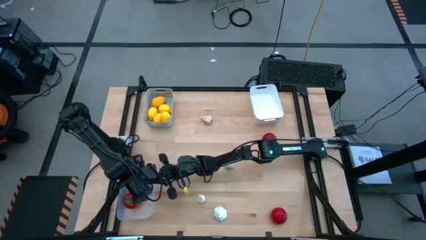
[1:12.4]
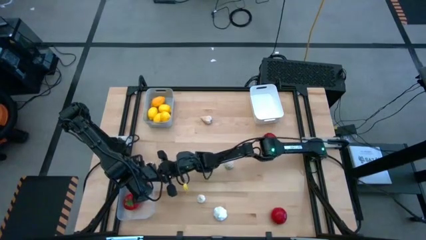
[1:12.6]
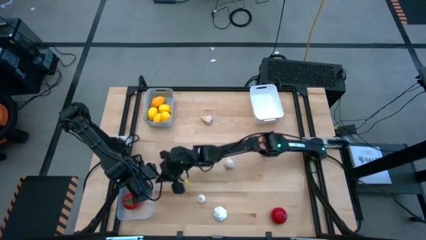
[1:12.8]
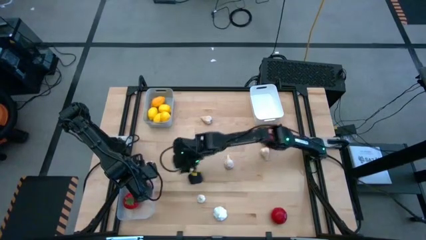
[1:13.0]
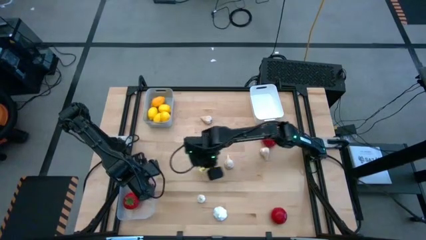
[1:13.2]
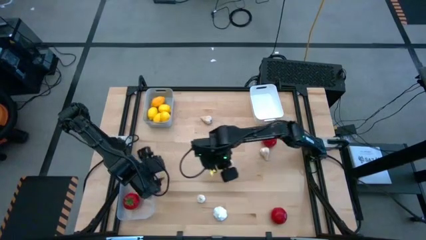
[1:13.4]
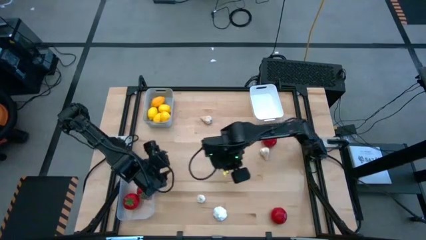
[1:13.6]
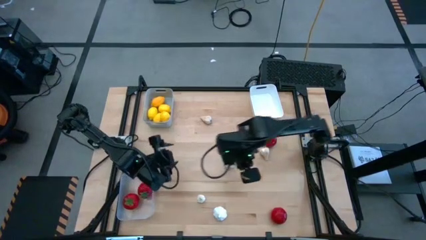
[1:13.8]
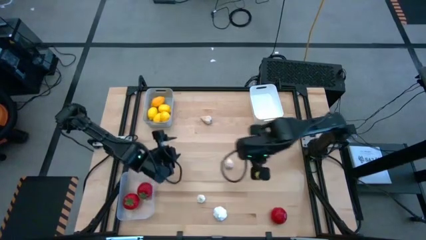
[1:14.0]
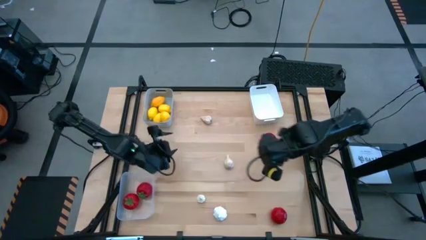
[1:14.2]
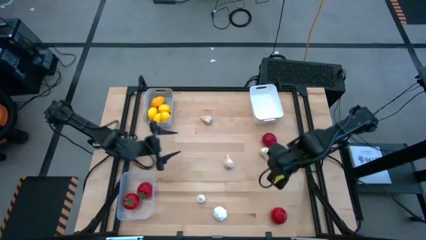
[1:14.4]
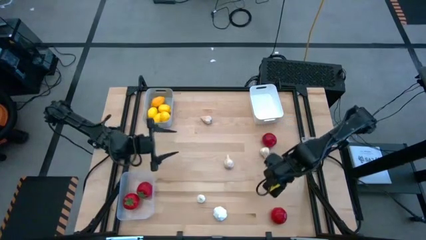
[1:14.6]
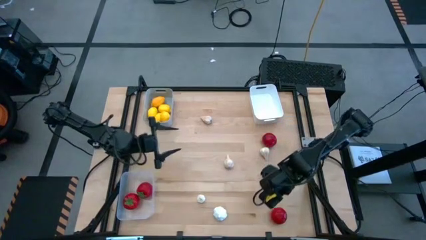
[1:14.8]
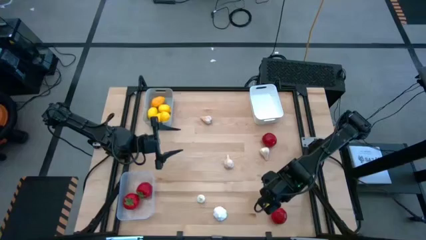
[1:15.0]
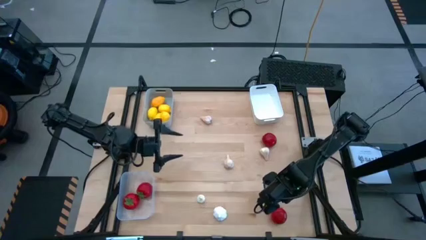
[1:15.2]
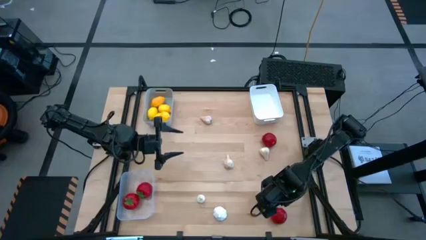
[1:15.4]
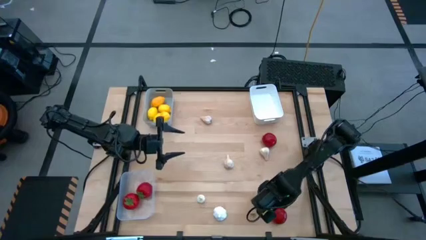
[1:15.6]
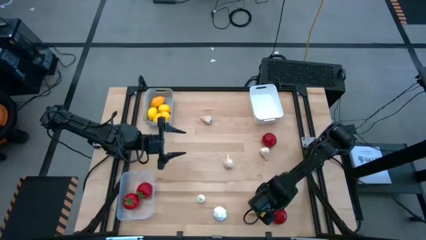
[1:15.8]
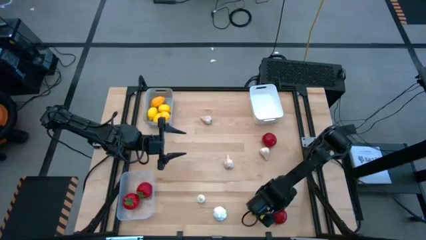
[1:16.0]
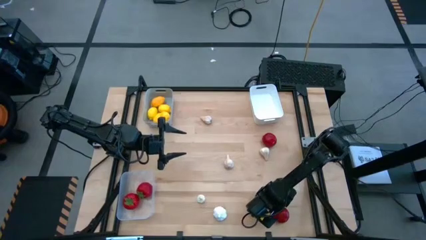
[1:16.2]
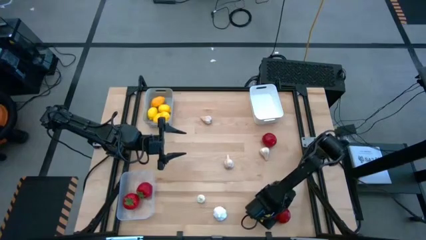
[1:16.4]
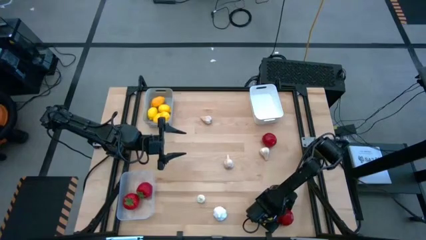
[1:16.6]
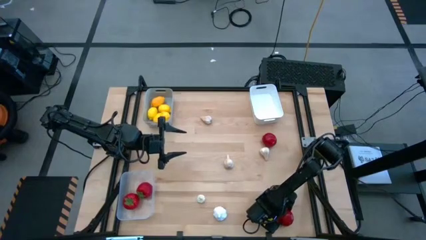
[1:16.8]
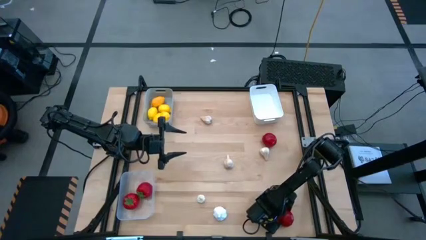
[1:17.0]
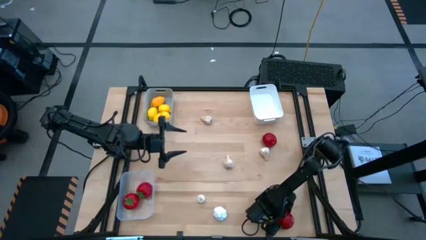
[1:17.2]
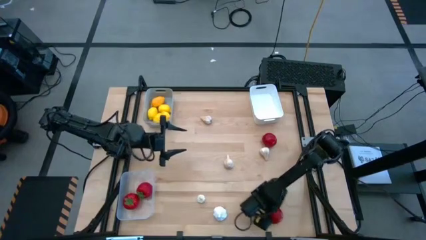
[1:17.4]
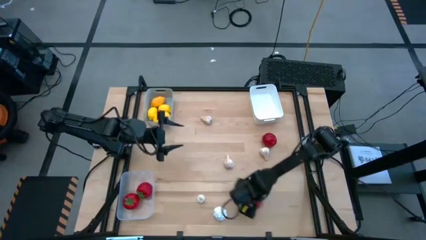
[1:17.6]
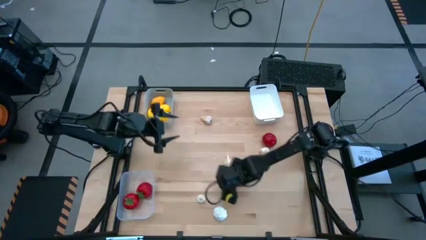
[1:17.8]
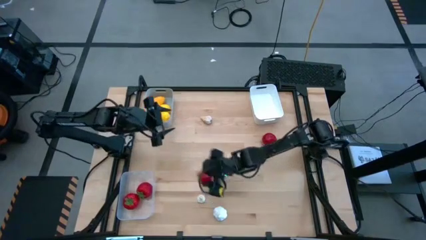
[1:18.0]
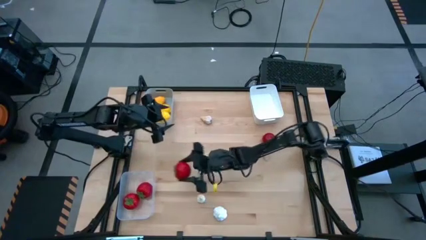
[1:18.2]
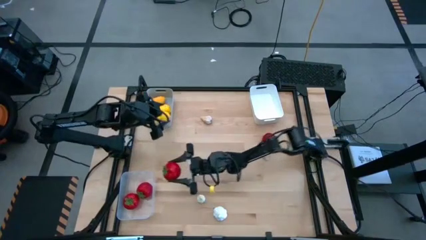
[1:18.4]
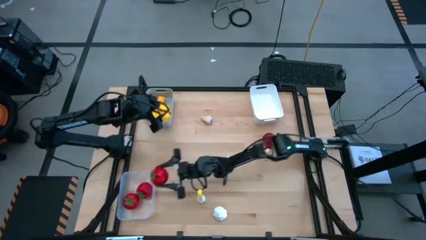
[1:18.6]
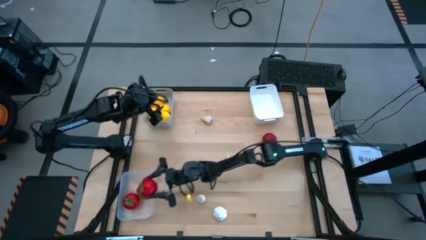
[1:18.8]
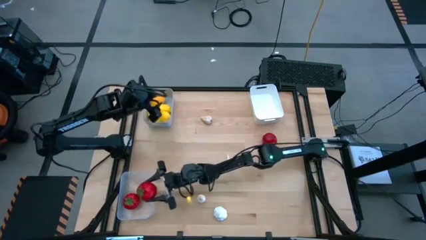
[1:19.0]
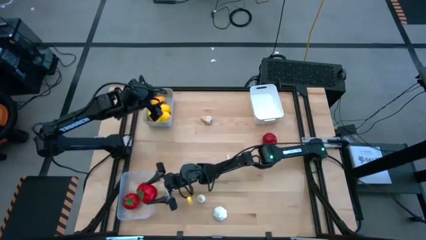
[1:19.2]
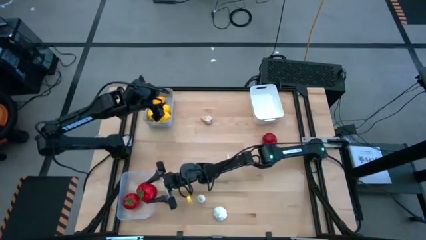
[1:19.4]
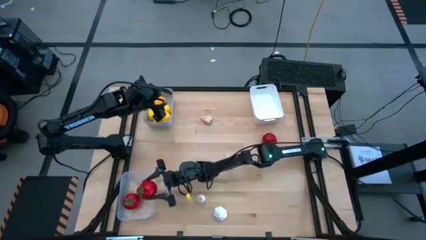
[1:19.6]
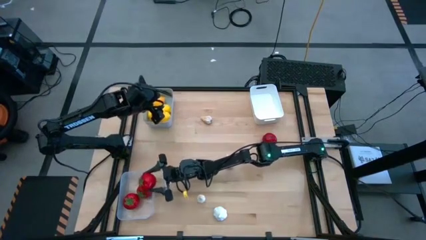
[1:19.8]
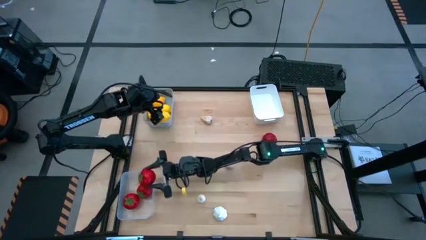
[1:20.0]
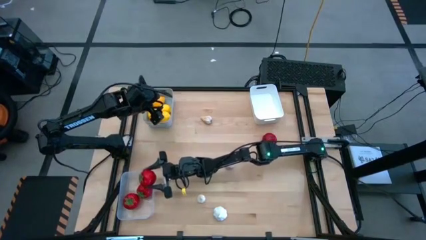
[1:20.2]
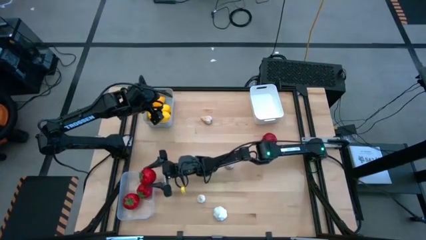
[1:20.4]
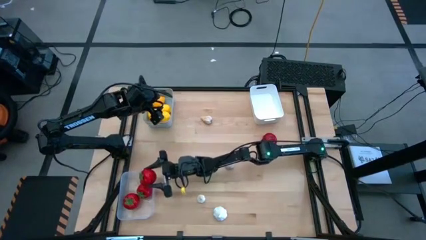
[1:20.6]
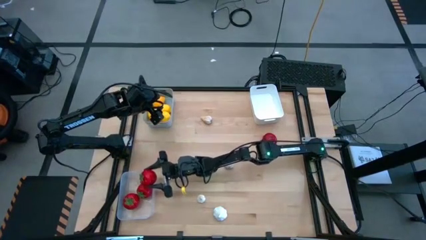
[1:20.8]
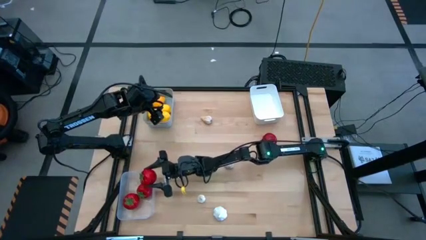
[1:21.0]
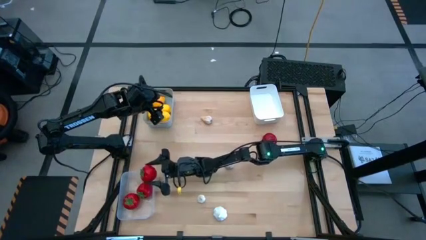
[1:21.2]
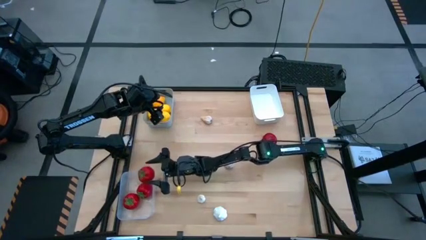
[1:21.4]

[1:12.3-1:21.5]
Task: Sort produce into baskets
Put the red tomato into the transparent bin

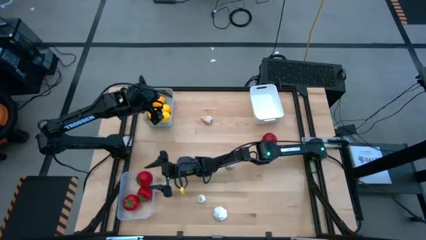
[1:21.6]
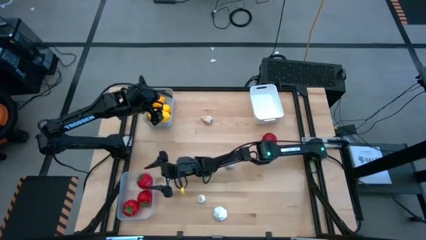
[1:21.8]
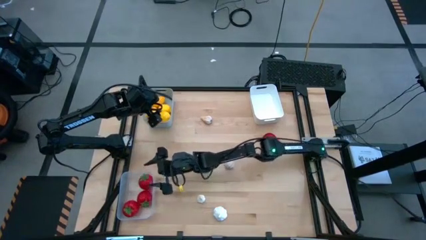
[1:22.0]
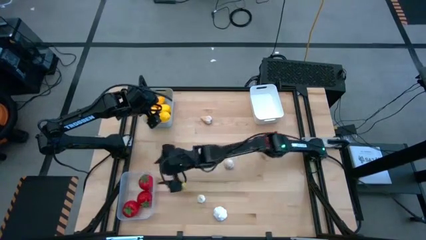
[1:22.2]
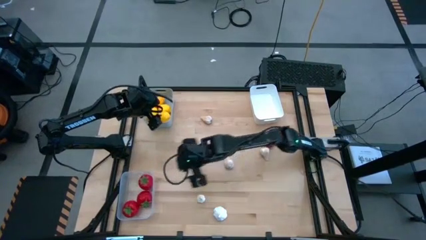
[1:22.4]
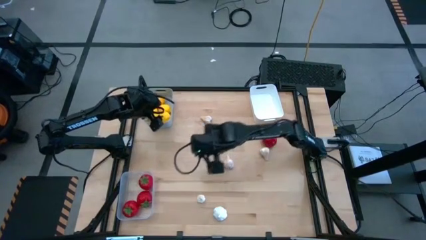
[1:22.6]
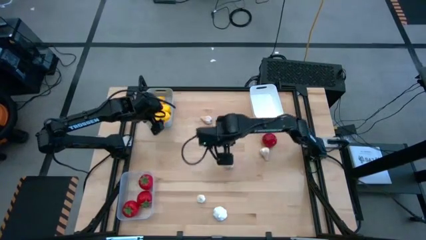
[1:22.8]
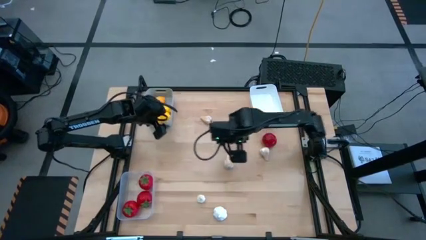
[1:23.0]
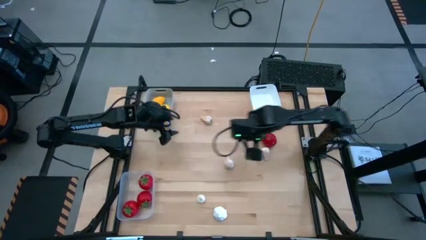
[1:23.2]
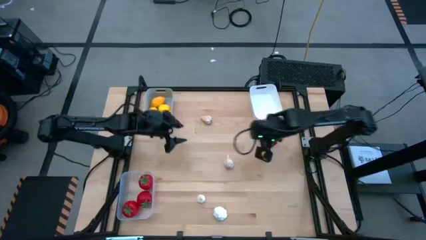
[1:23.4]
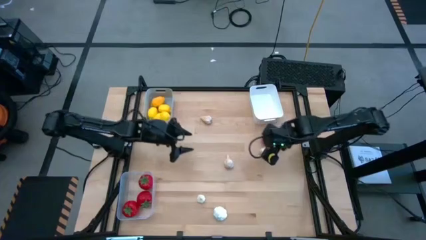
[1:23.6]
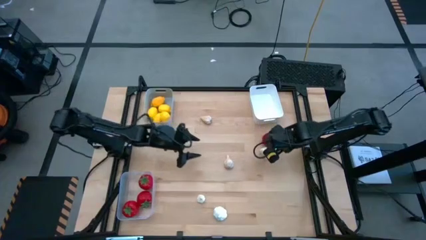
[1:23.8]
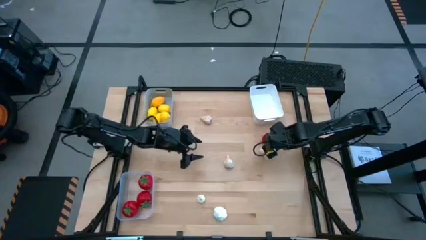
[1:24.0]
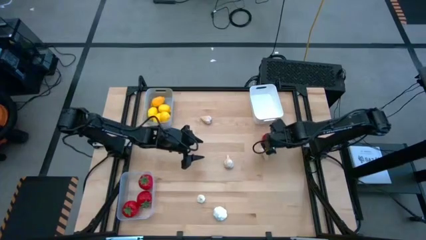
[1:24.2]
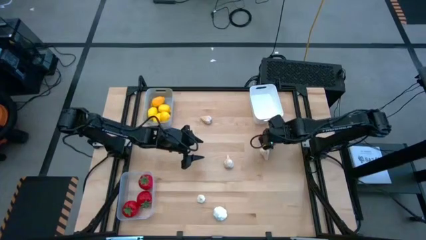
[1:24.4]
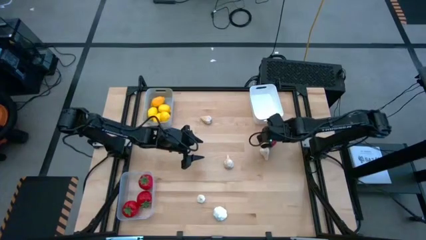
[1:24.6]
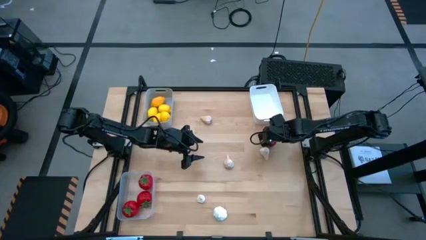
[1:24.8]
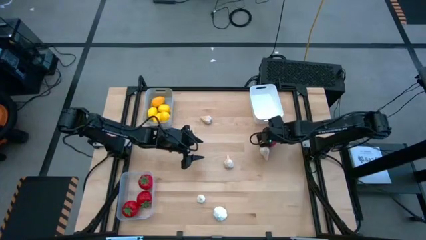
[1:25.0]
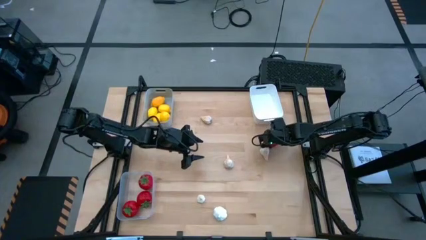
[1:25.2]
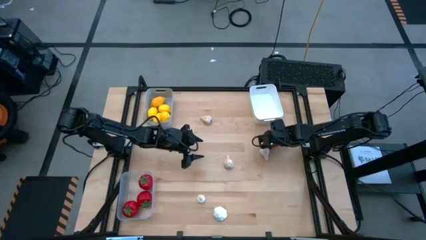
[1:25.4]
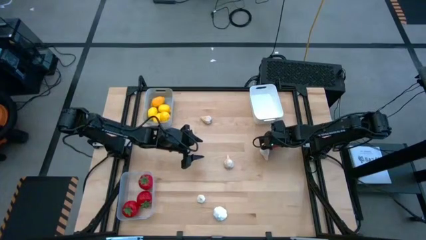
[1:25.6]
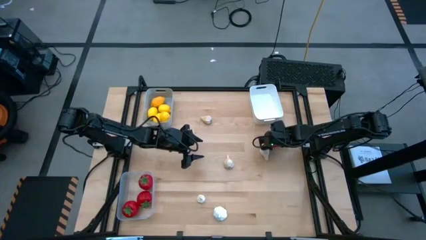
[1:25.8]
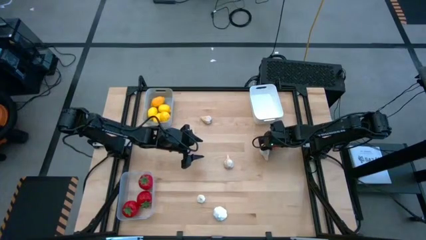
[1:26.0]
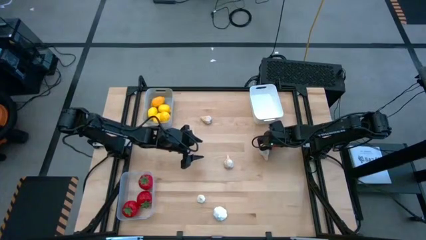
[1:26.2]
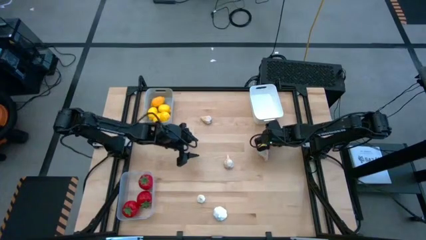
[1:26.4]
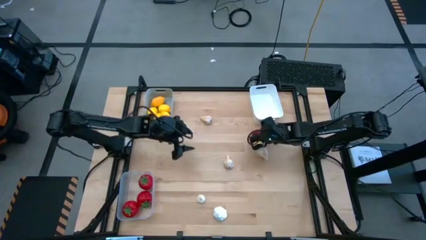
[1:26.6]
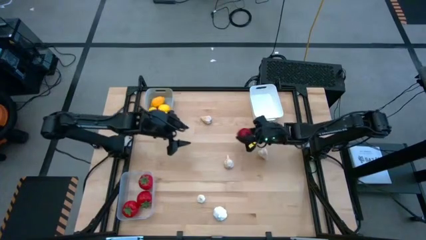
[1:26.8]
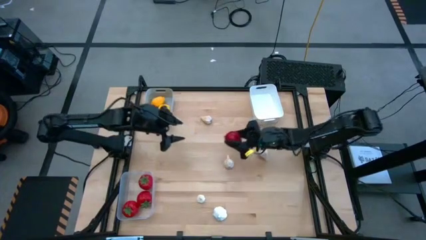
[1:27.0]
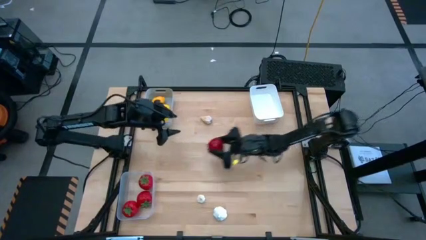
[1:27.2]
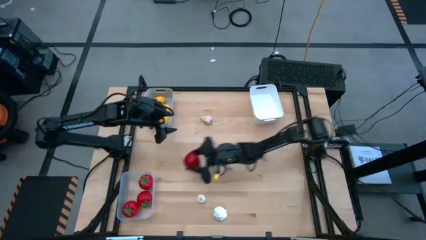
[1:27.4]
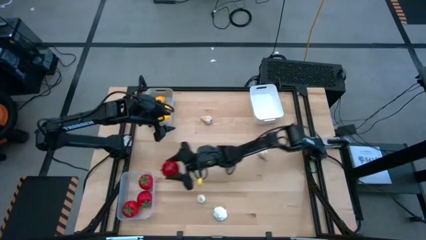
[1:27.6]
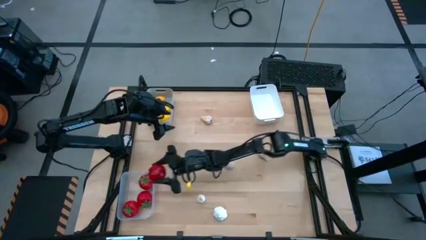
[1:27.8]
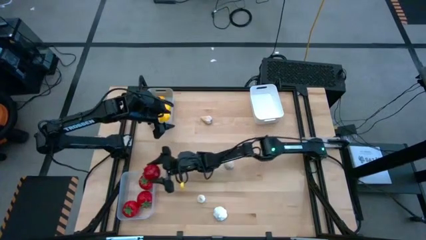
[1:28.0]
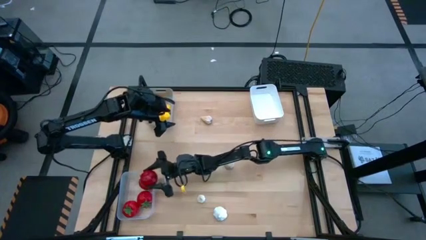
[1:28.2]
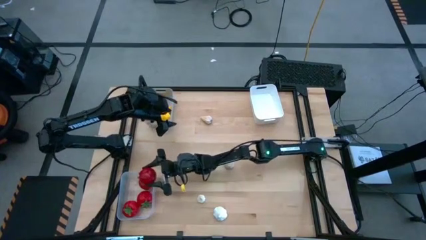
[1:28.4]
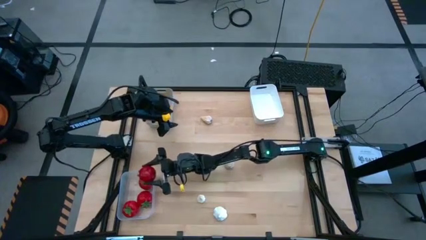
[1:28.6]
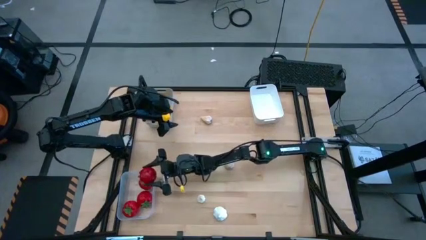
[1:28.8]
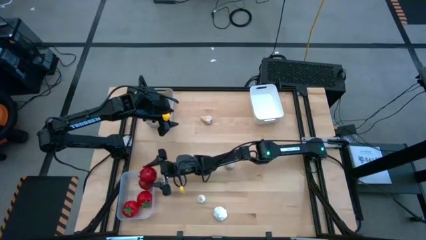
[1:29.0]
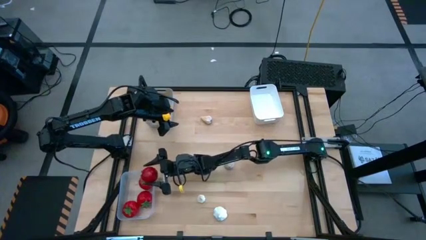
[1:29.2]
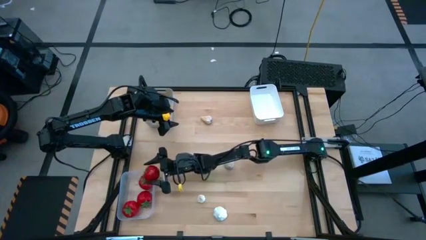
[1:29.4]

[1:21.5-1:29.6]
Put the red tomato into the transparent bin
